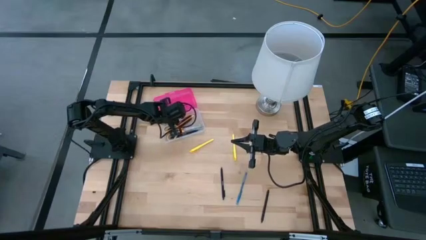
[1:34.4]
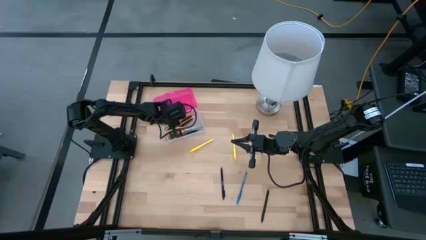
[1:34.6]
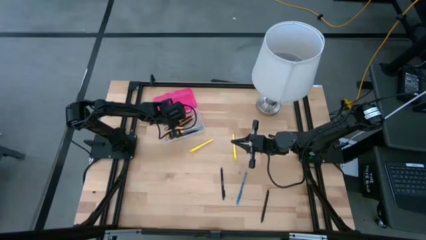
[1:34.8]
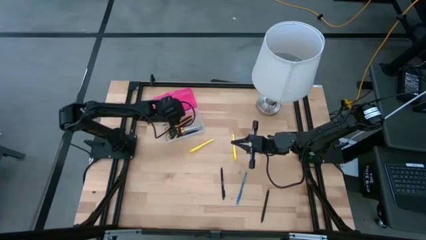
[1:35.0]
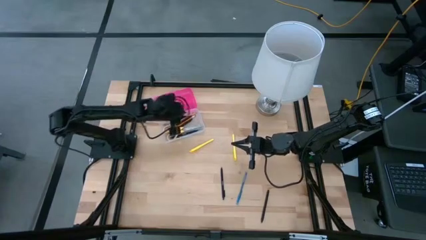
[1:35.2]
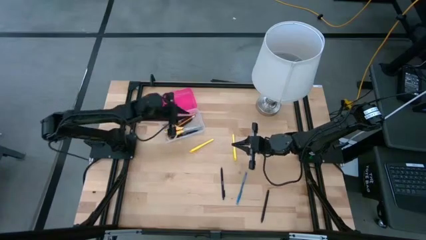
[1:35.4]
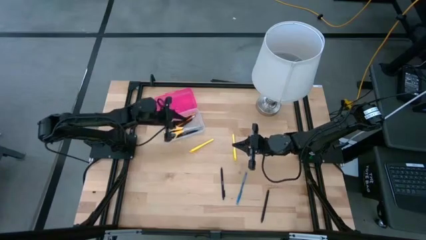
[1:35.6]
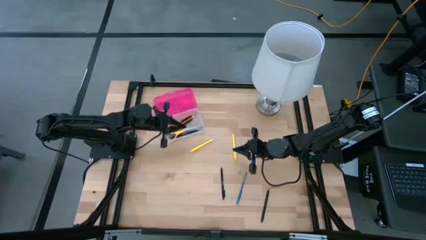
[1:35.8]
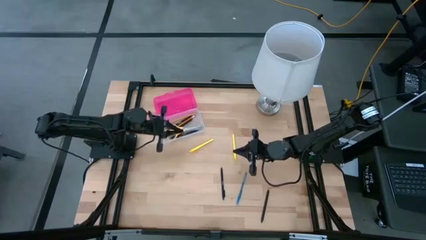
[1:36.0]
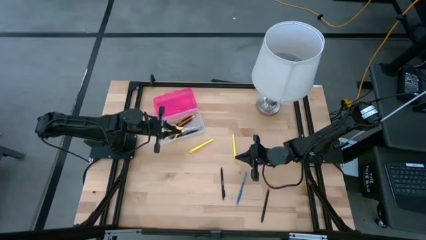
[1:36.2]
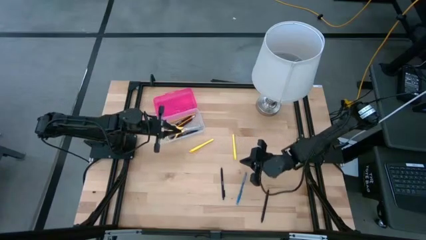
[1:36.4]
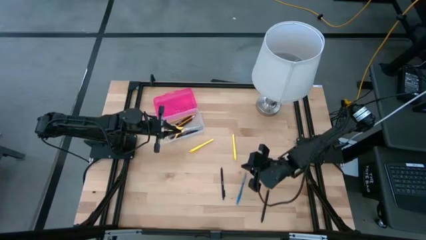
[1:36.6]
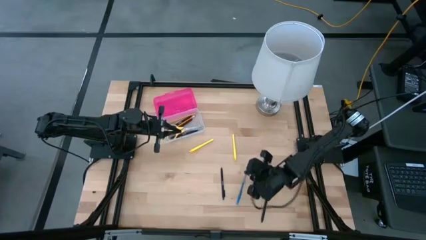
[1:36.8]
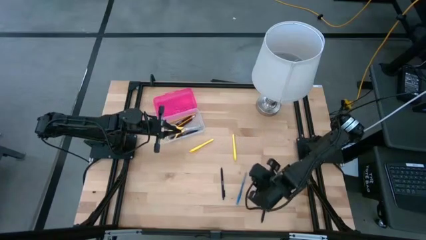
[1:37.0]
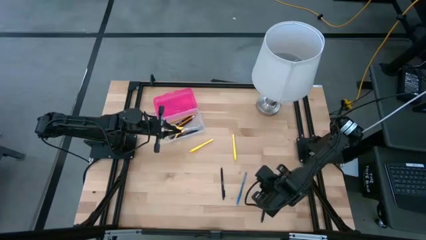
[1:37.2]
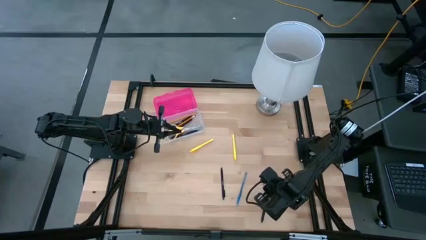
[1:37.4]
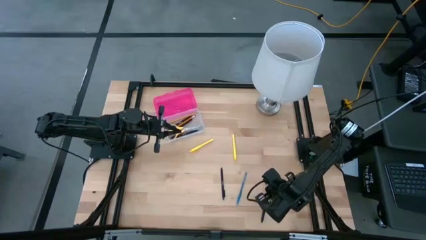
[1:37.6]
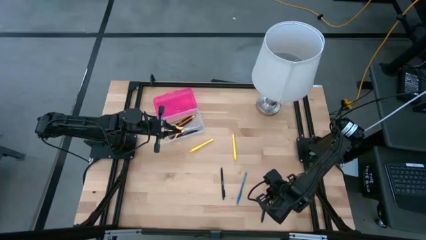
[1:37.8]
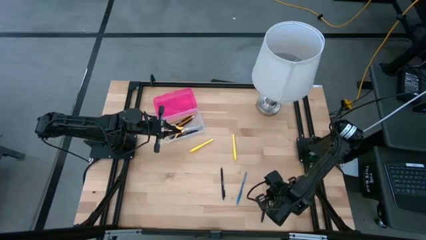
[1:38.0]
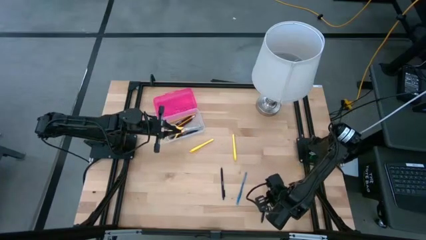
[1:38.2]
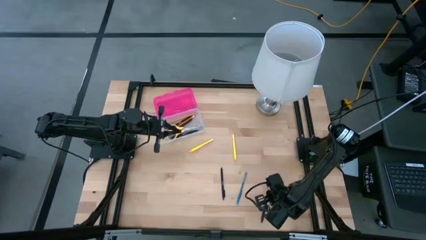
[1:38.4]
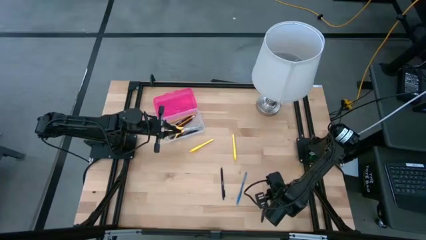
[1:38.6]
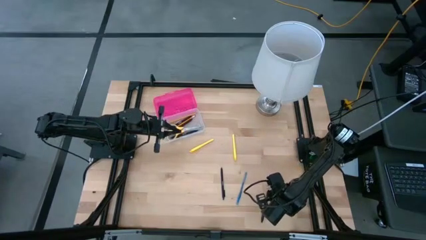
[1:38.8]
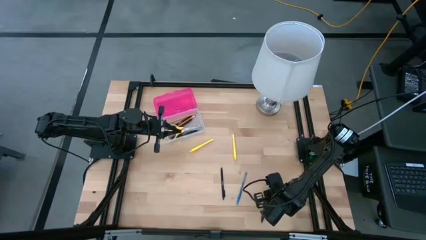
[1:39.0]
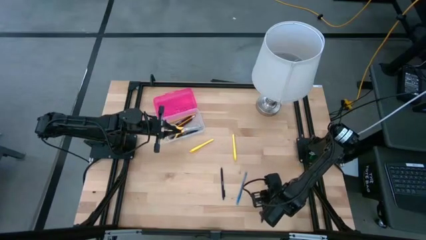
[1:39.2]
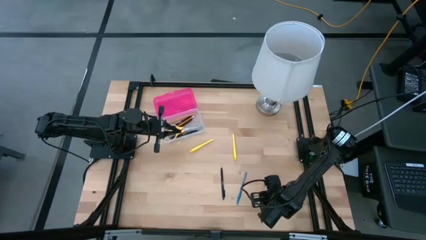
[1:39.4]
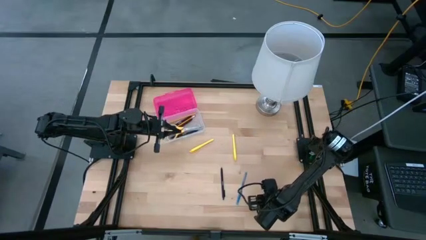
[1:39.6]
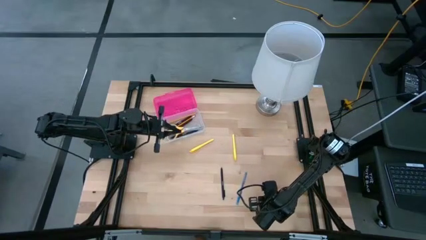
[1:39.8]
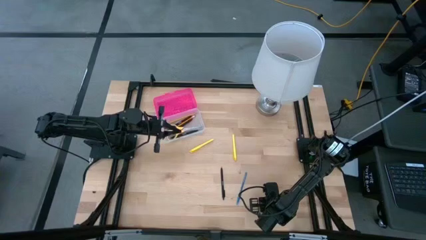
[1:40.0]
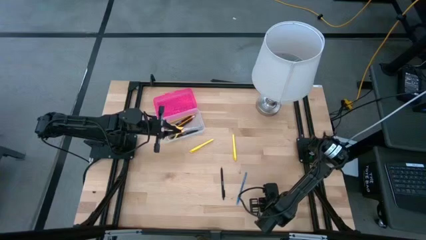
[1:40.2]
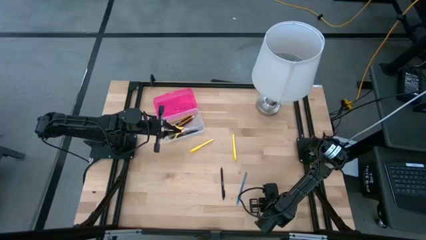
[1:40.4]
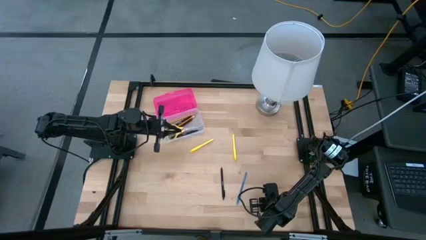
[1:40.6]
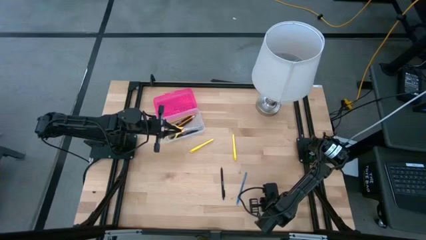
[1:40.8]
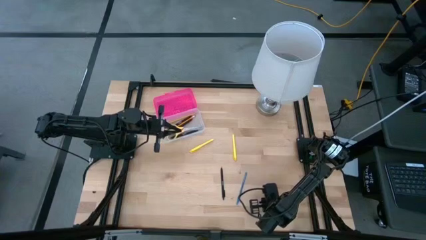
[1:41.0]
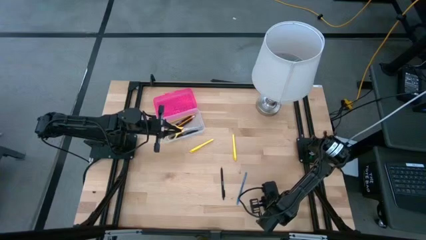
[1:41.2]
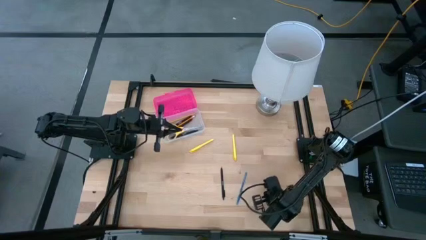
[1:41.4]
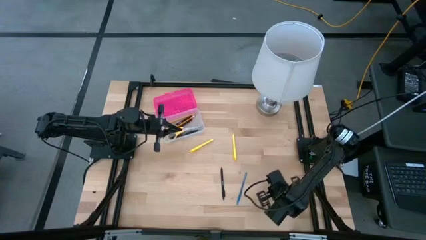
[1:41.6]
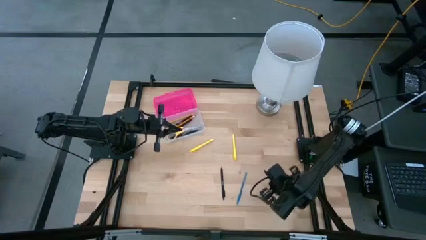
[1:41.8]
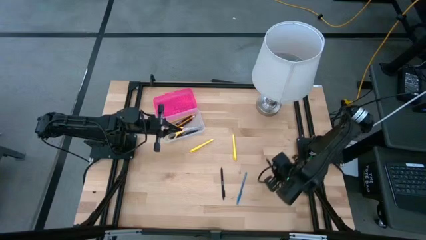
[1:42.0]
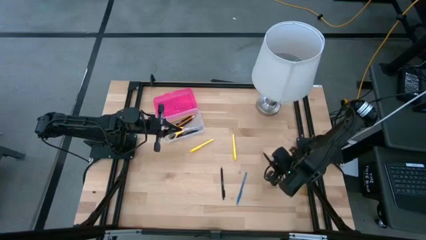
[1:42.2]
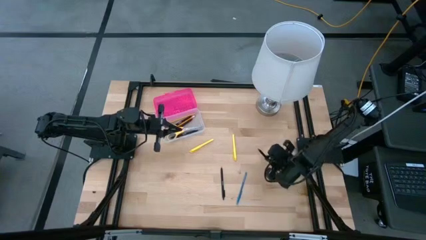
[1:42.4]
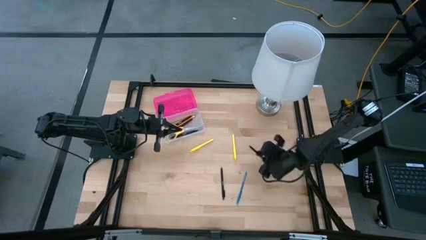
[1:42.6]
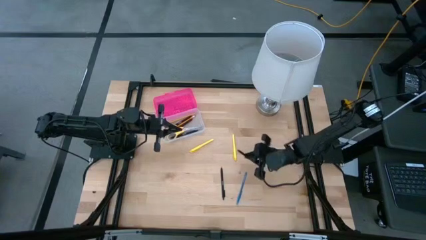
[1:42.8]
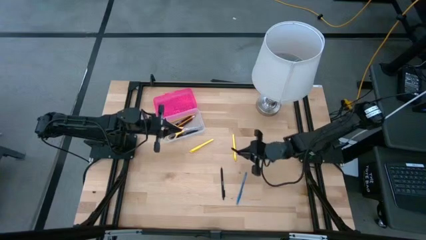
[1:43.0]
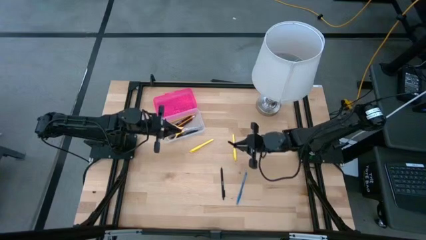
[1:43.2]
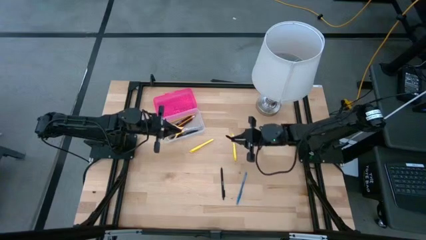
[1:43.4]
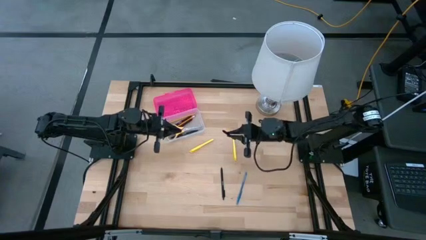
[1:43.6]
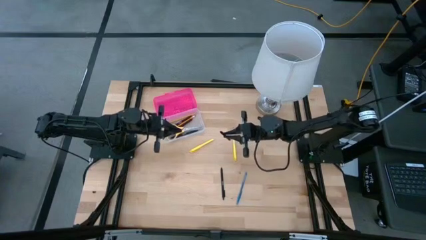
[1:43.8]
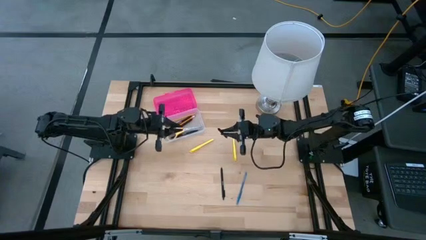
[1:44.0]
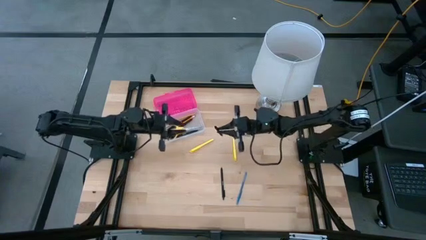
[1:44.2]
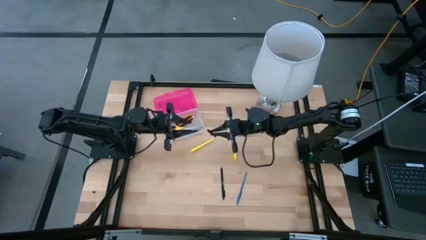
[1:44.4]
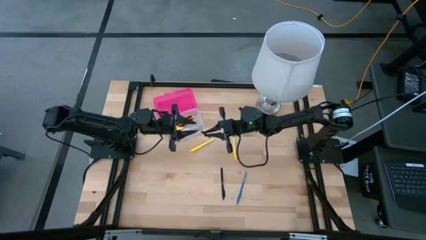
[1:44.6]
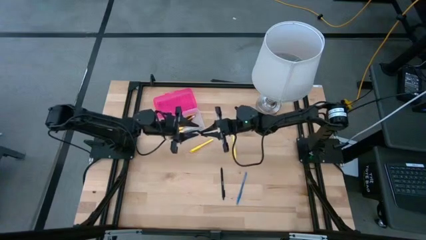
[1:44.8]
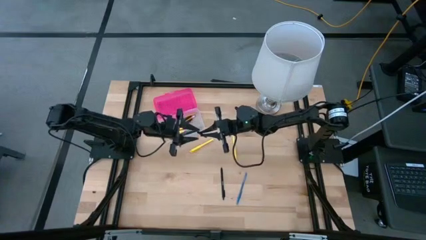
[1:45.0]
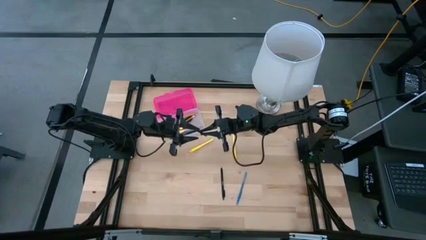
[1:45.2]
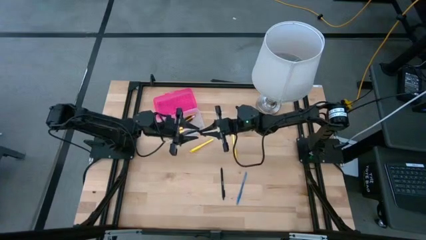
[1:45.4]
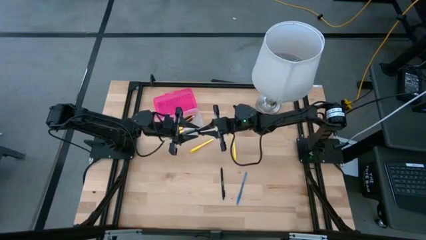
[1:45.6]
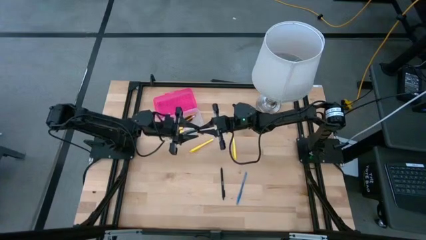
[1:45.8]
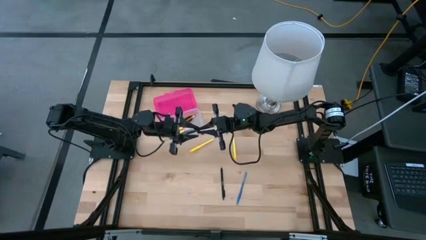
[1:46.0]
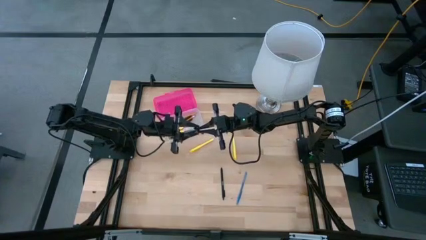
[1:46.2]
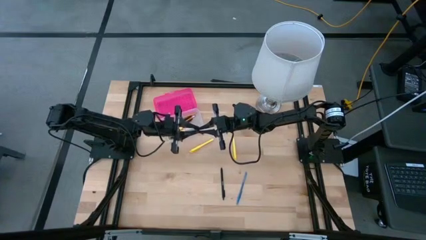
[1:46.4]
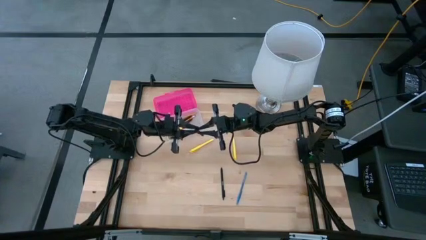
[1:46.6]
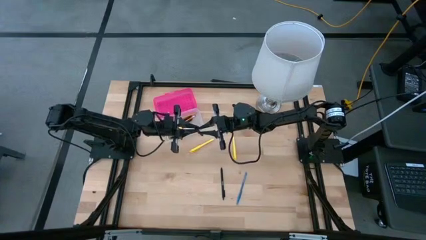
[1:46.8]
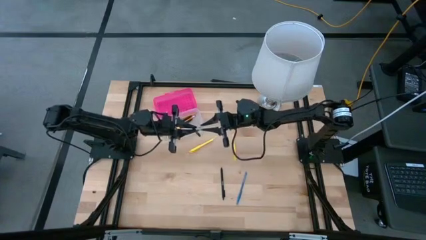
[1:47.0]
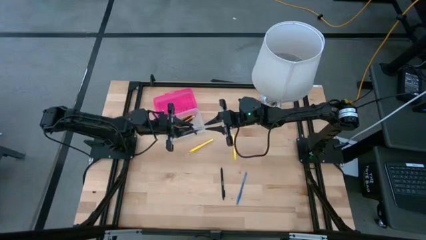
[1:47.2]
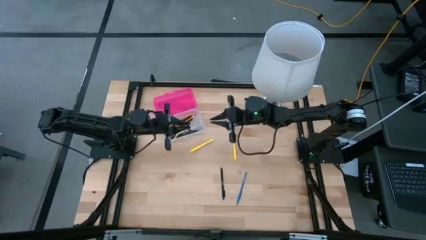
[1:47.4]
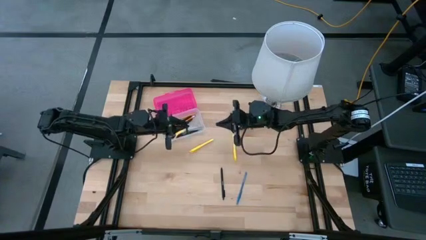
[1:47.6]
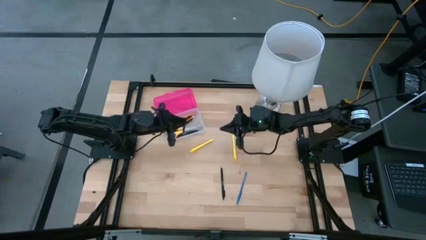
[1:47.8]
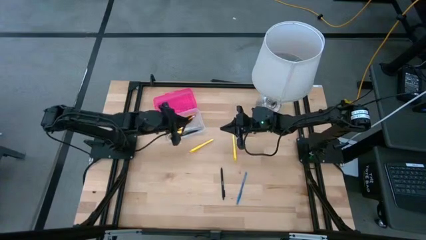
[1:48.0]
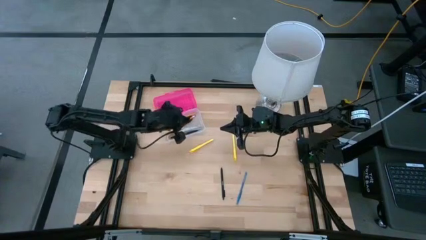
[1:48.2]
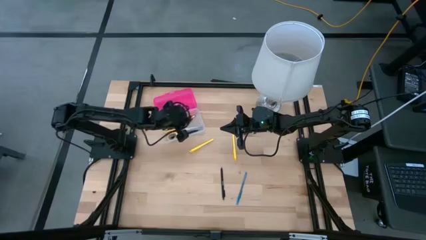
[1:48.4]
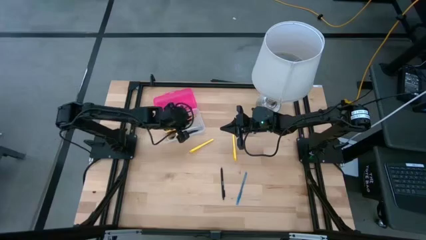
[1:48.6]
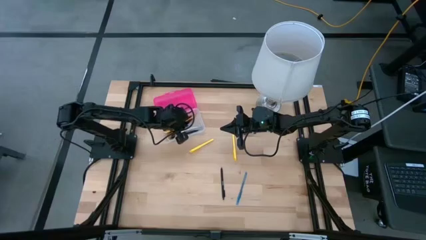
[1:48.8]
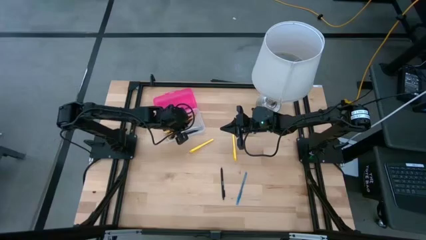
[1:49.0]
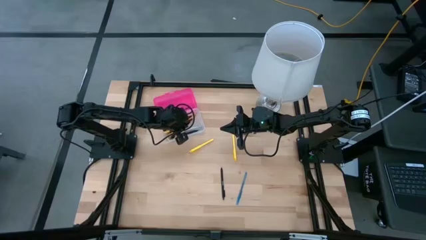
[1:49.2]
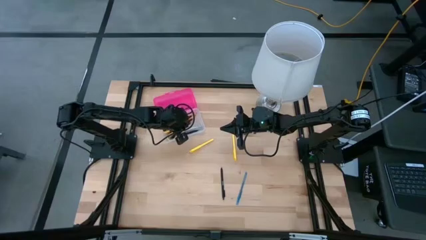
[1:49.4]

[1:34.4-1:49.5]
Task: Pick & place school supplies into a supply box
Put the black pen into the pink supply box

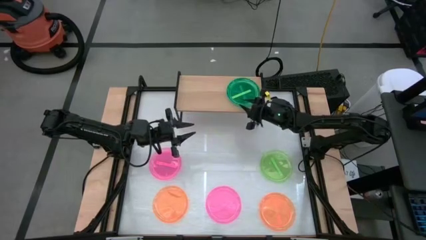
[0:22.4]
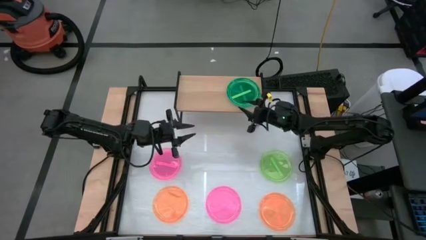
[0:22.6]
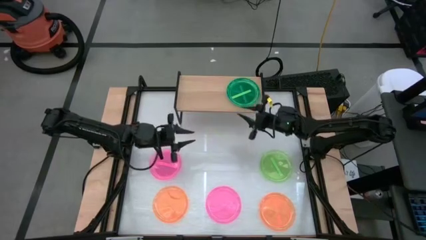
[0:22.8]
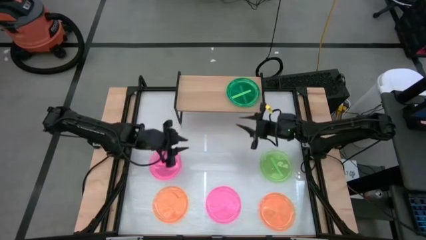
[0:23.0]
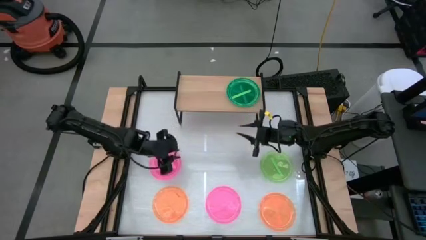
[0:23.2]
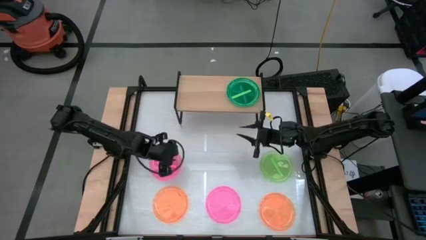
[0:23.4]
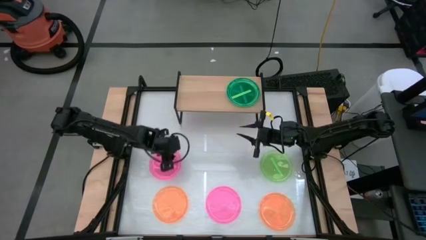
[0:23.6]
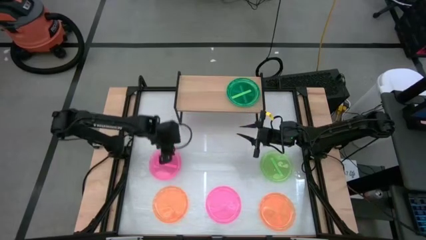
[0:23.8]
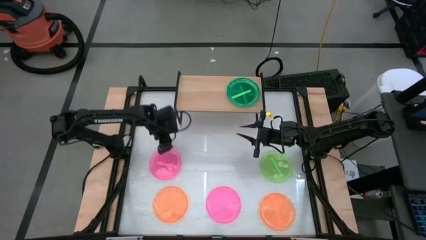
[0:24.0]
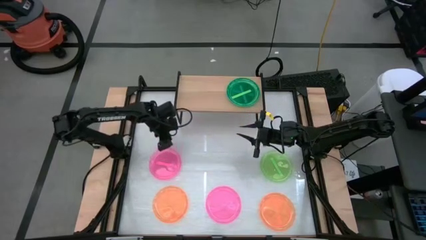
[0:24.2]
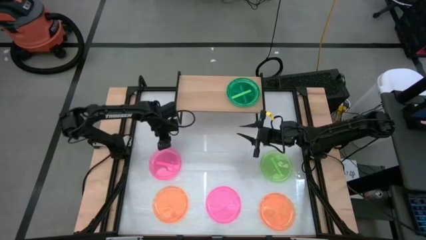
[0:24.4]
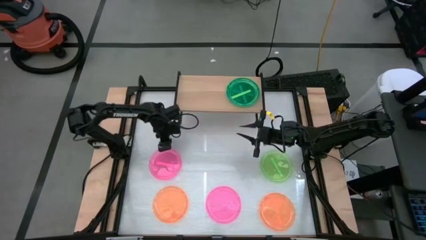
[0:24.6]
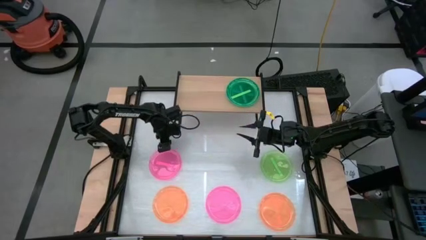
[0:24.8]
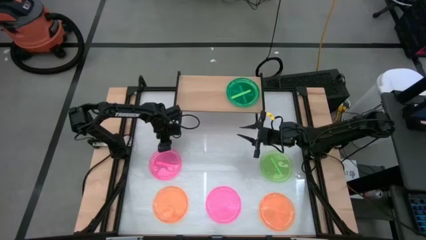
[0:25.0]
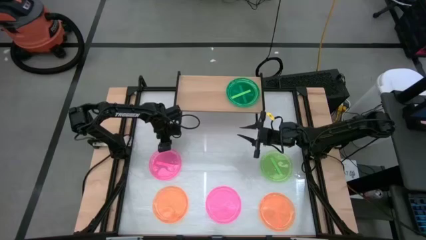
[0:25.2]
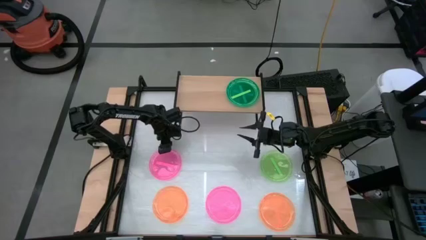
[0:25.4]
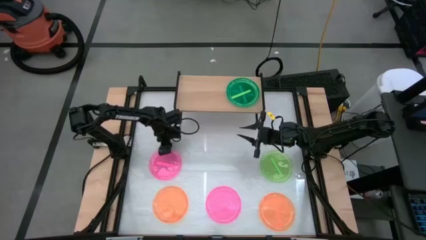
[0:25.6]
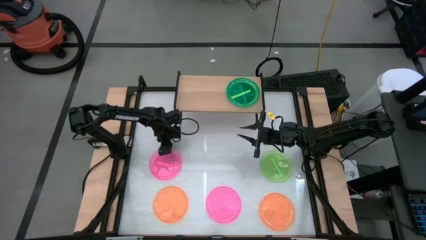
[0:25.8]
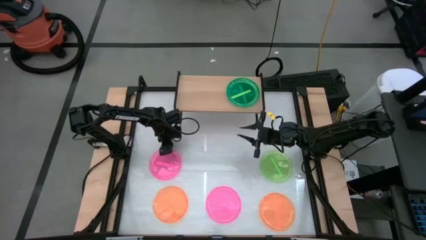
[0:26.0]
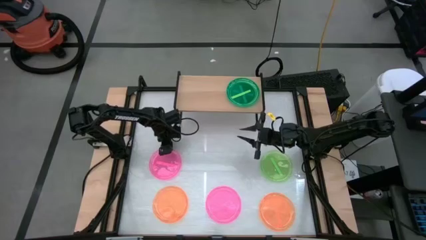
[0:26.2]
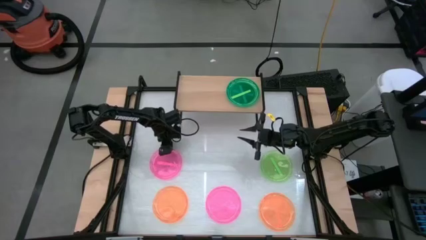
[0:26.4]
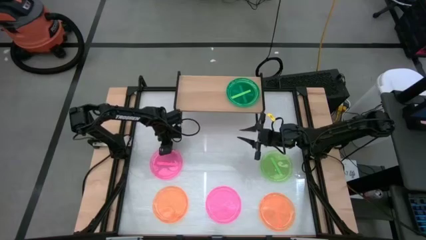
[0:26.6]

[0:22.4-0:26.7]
Task: Place and stack plates onto a shelf
Stack the top pink plate on the green plate on the shelf
